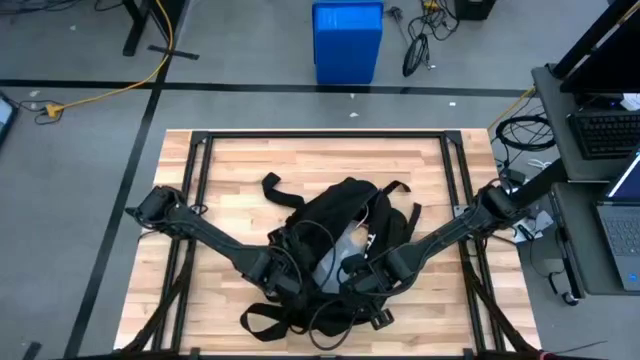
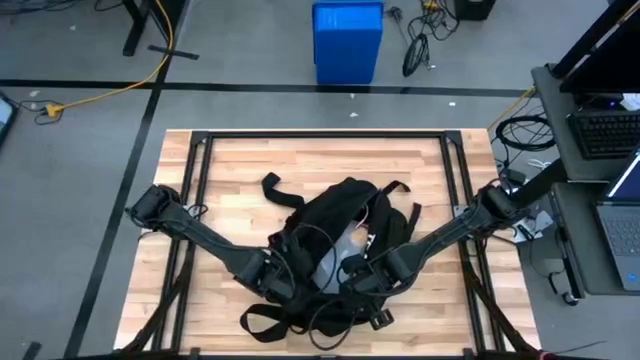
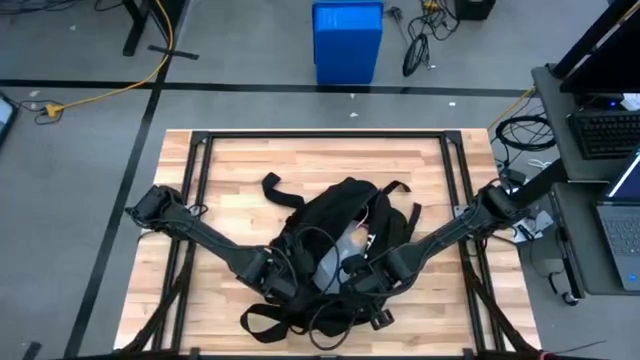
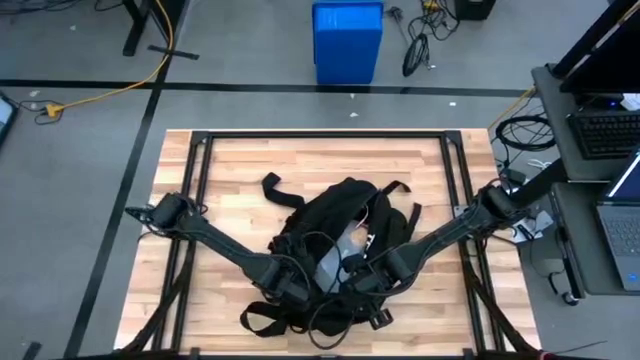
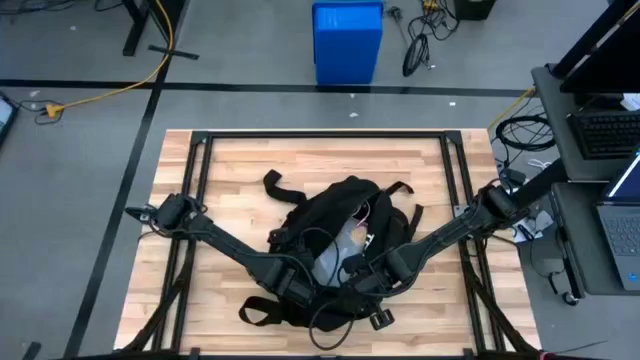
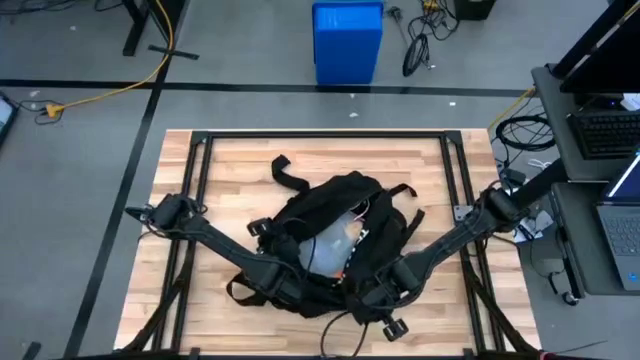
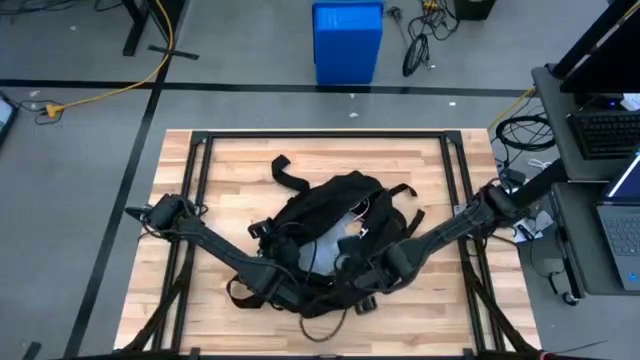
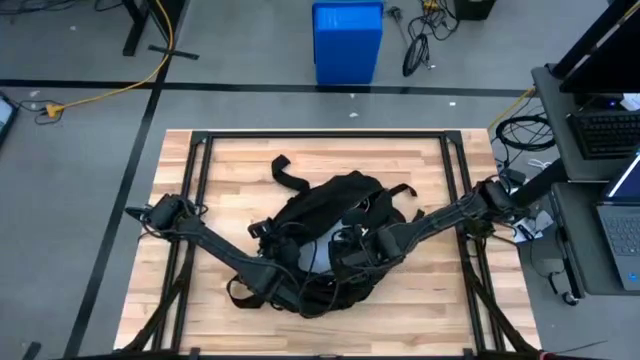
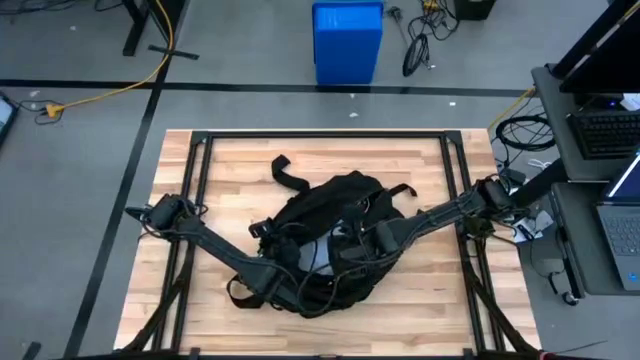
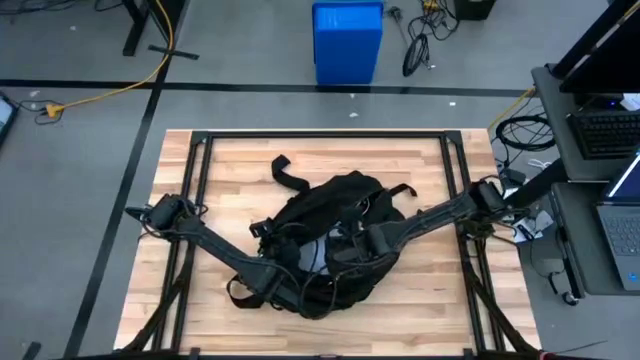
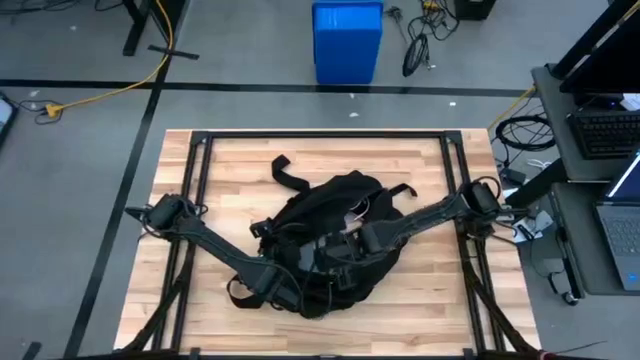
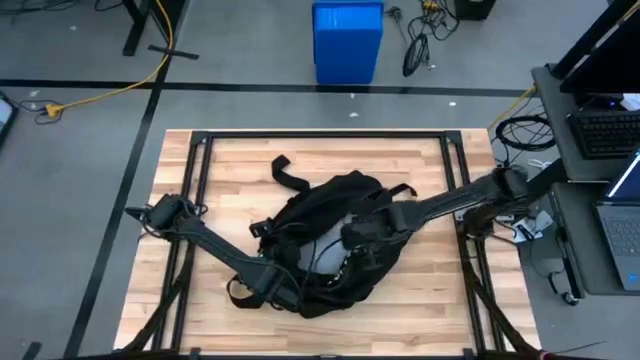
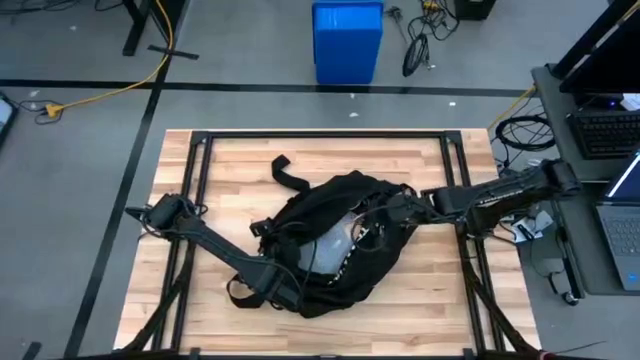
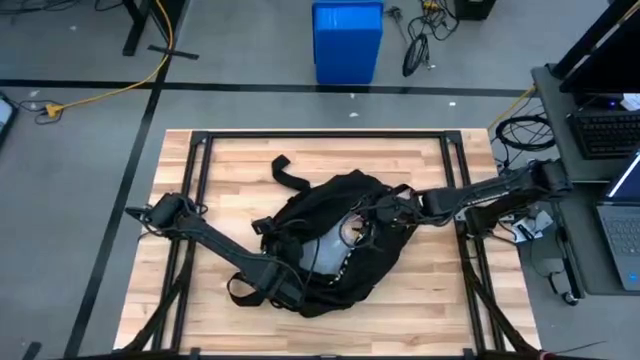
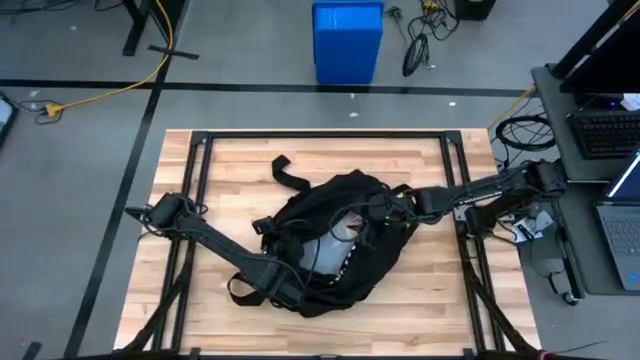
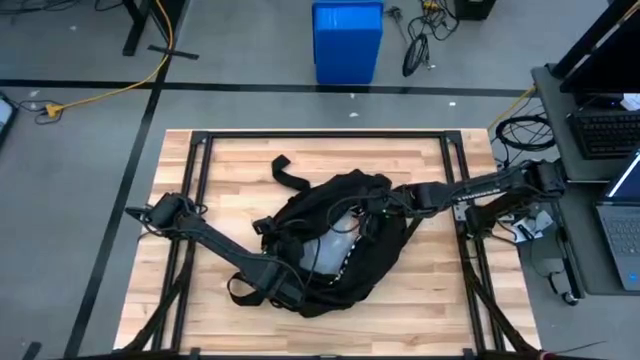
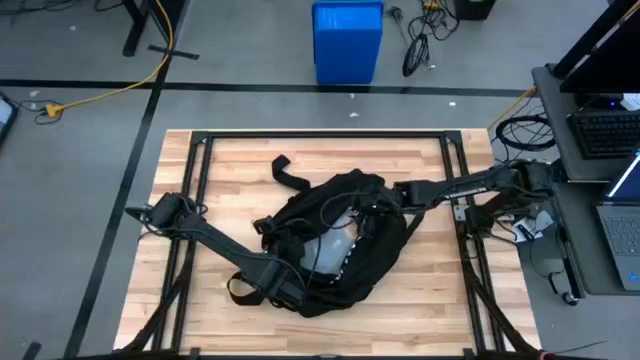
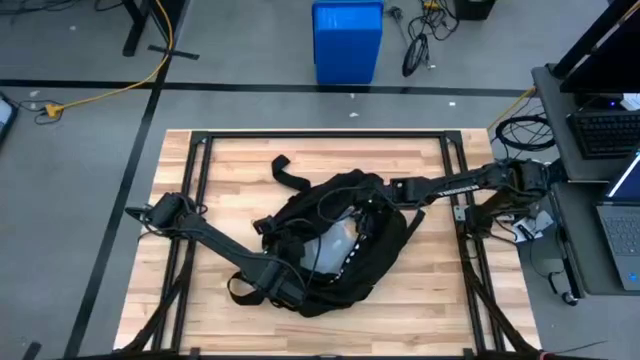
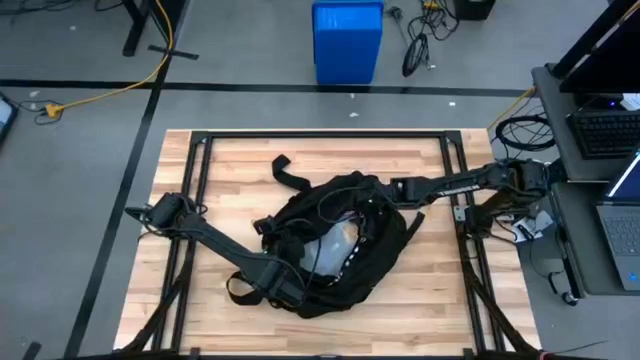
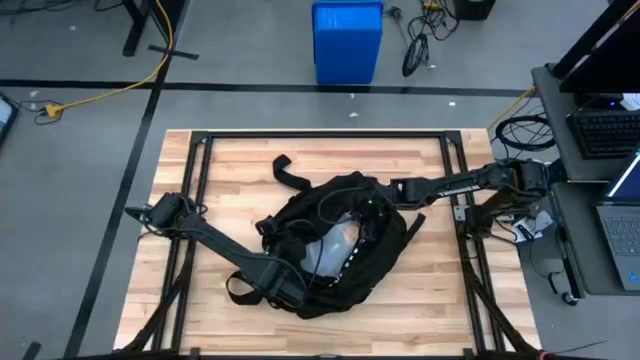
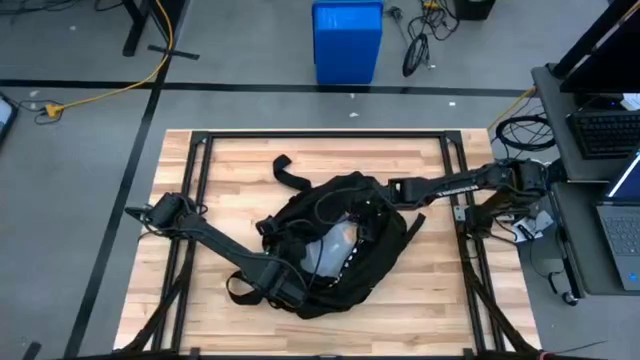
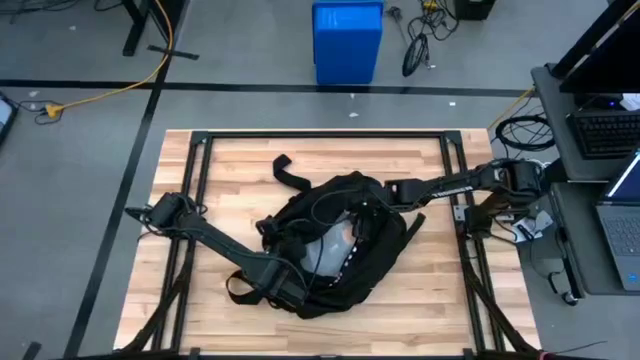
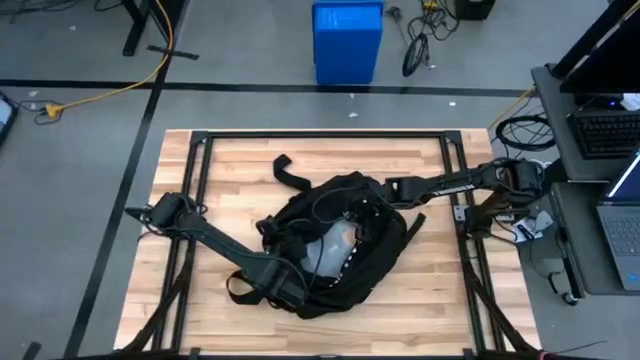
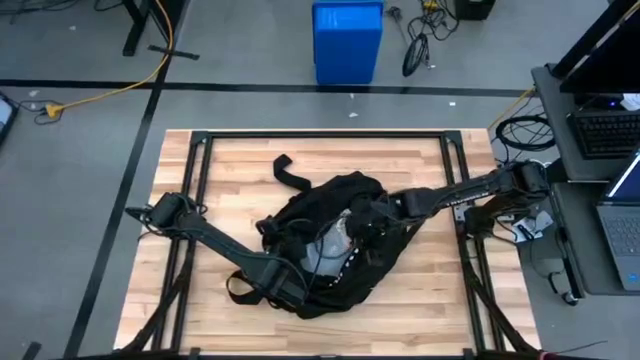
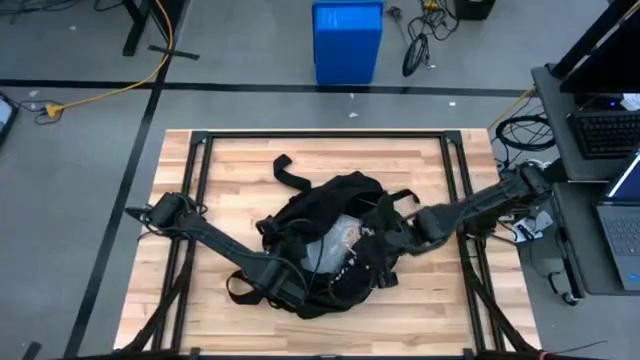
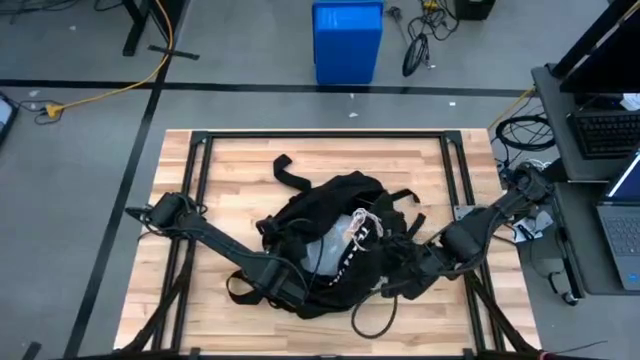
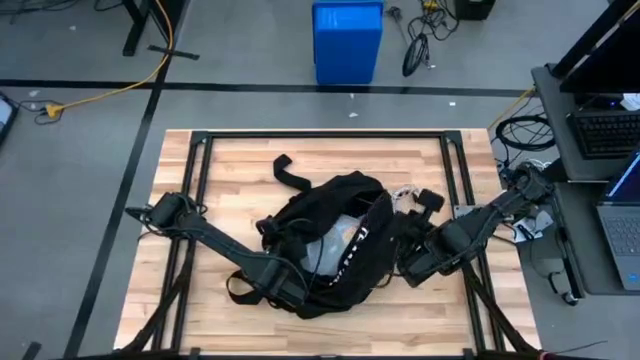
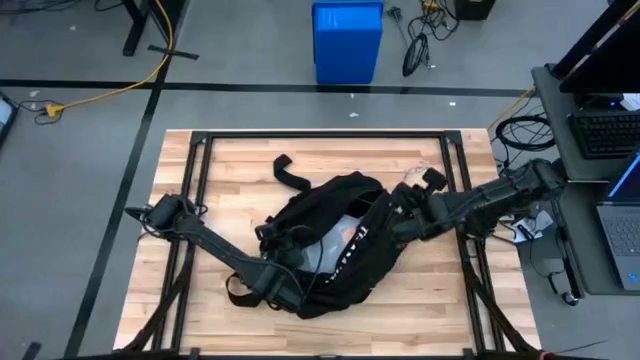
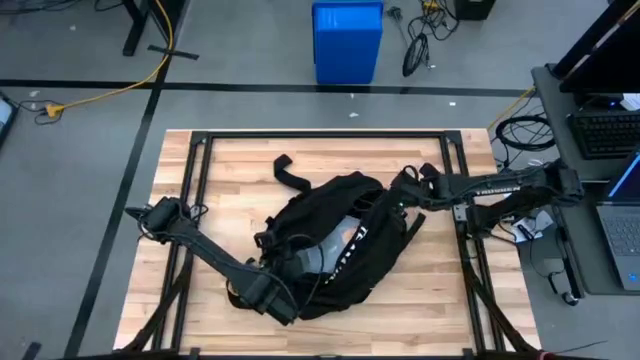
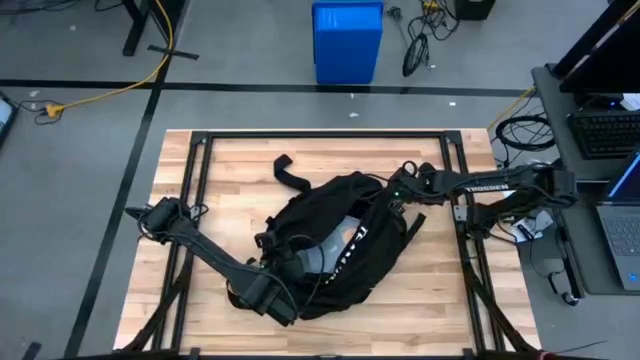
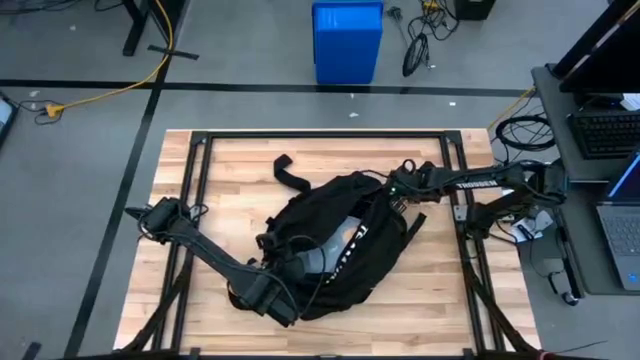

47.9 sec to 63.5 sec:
Task: Unpack backpack
Remove the charger cable from the black backpack

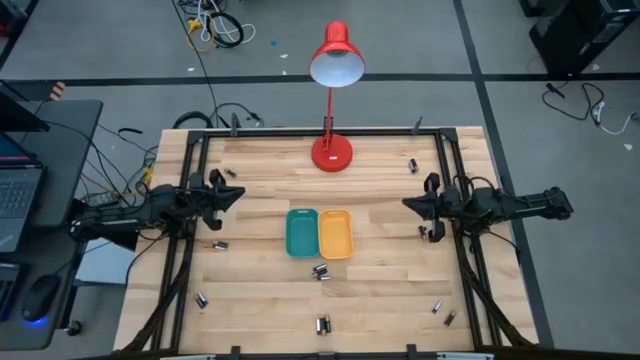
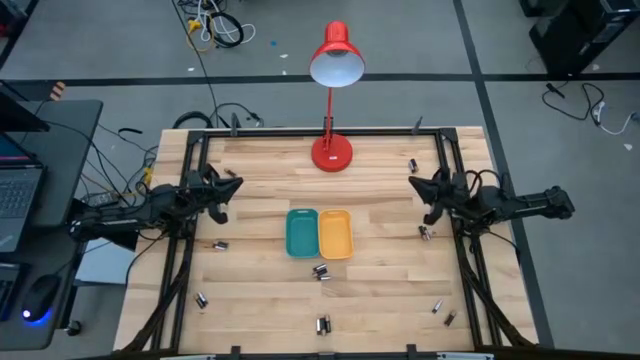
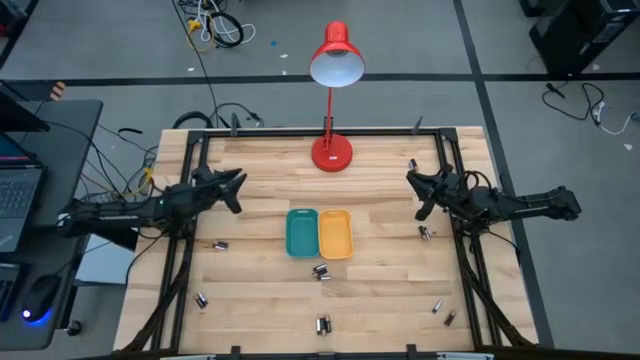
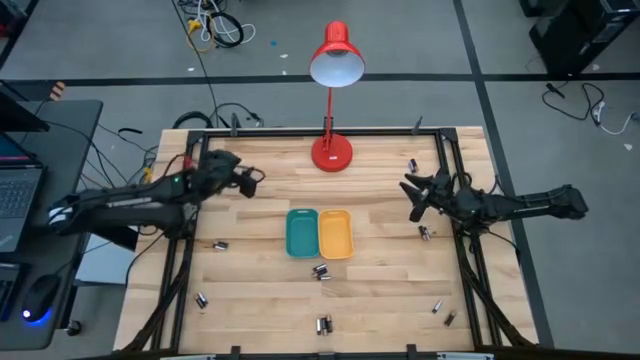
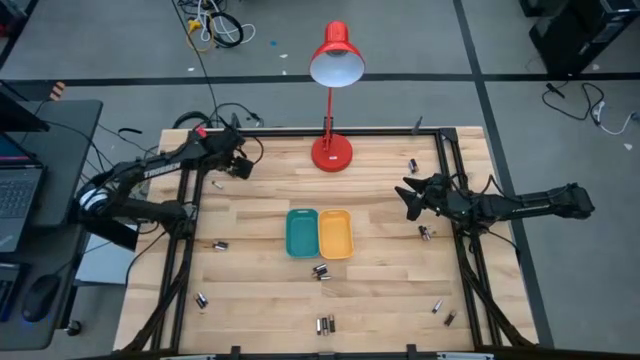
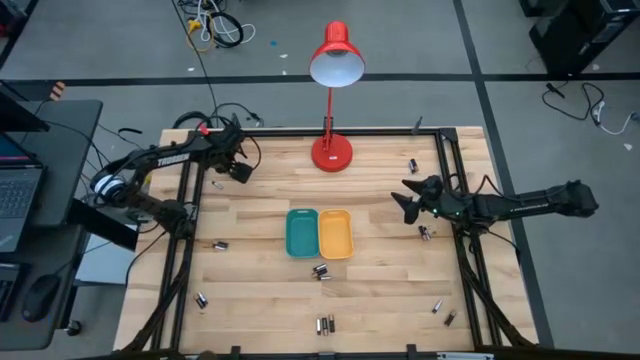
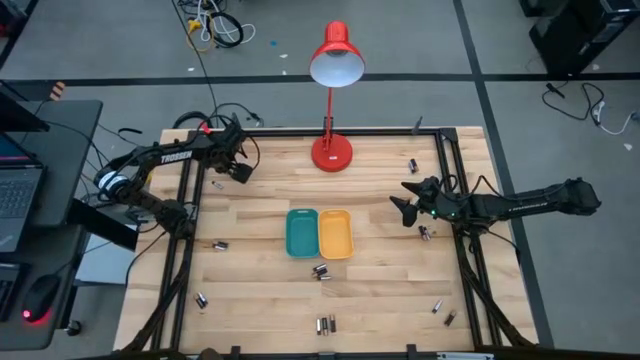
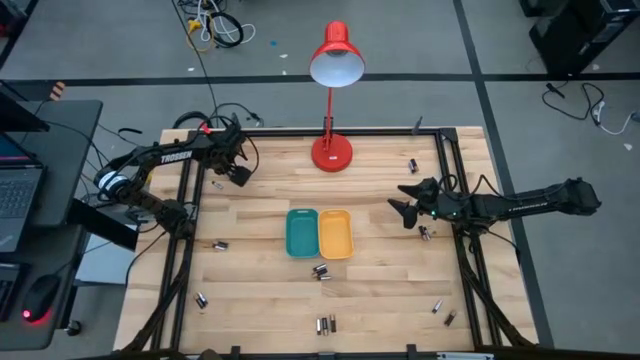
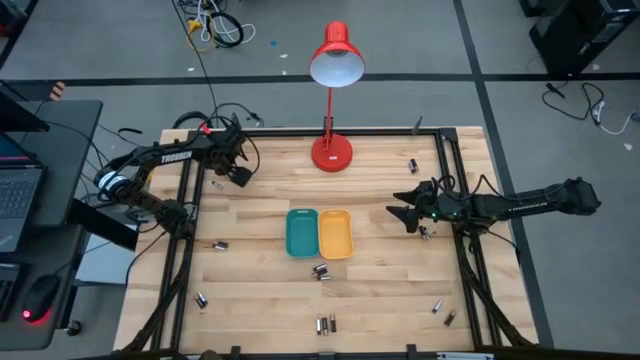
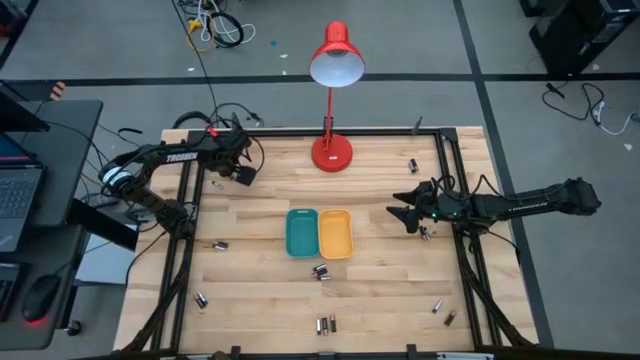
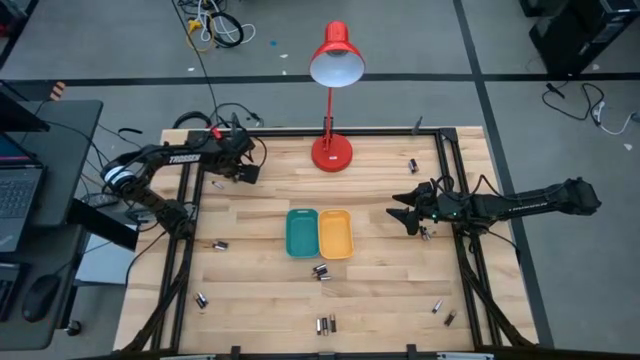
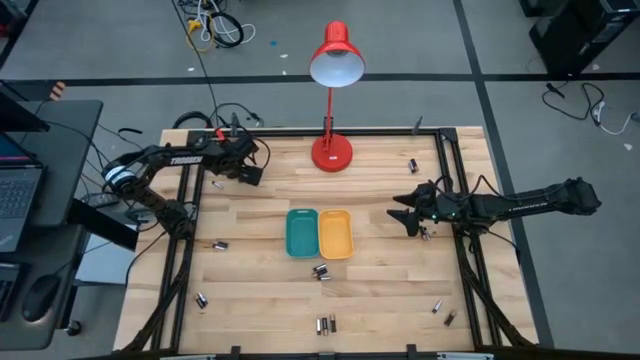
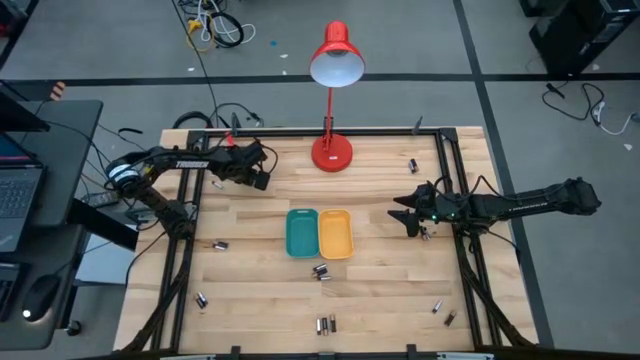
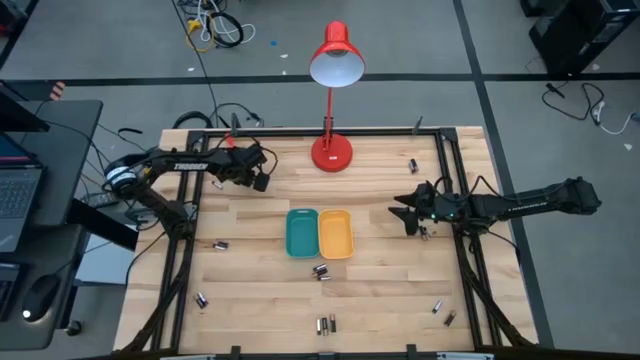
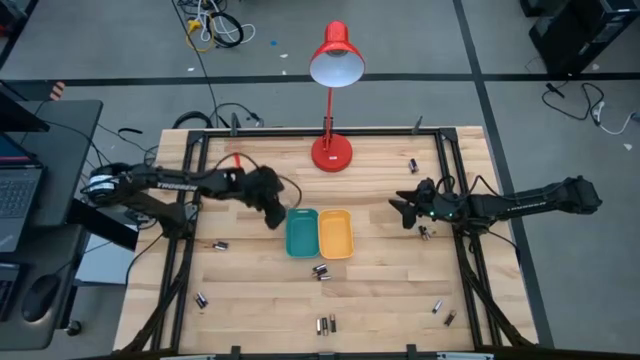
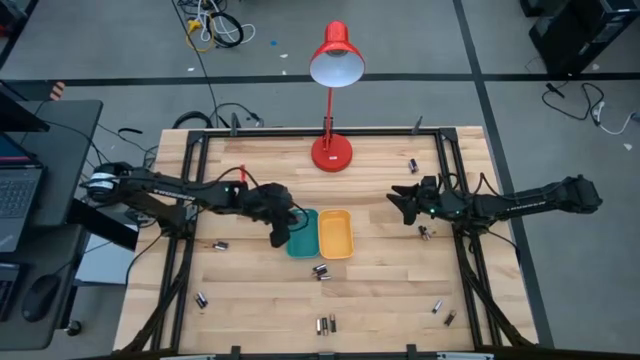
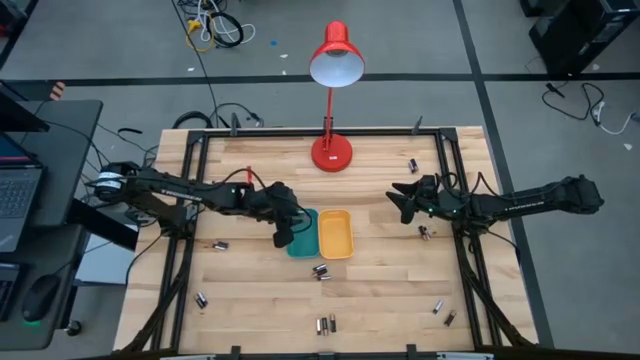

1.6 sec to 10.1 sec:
Task: Sort batteries
Put the black battery into the blue bin
